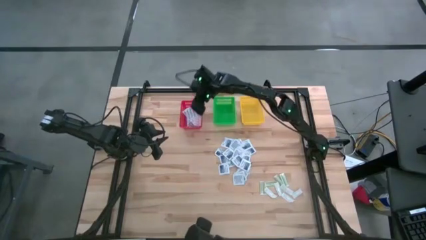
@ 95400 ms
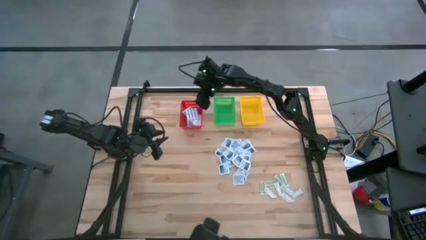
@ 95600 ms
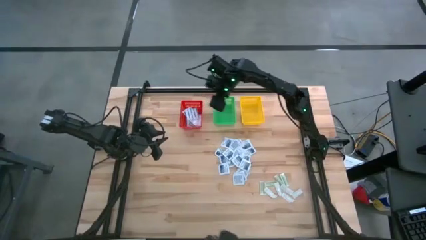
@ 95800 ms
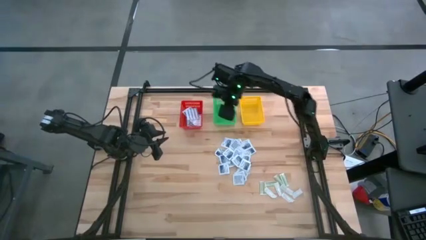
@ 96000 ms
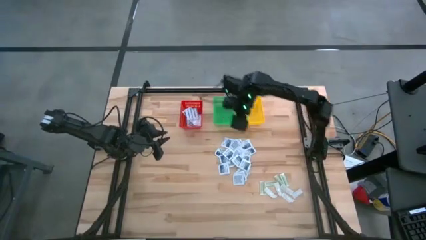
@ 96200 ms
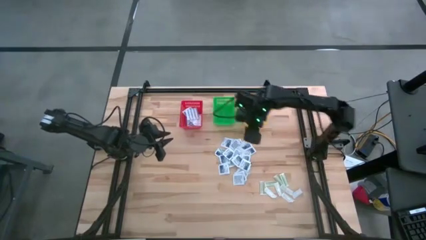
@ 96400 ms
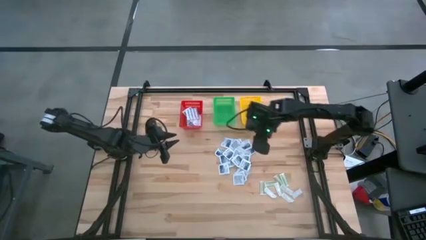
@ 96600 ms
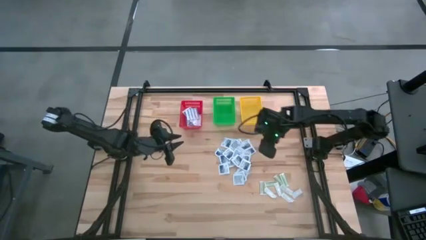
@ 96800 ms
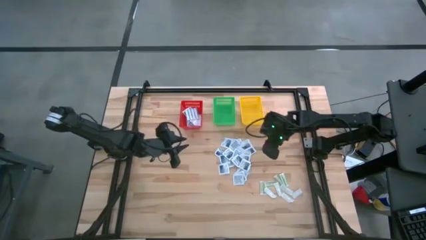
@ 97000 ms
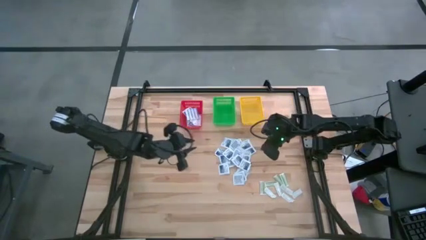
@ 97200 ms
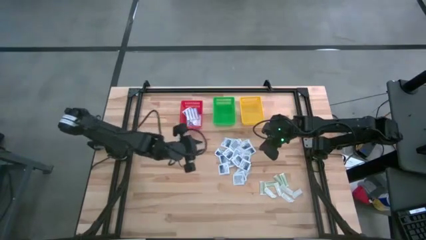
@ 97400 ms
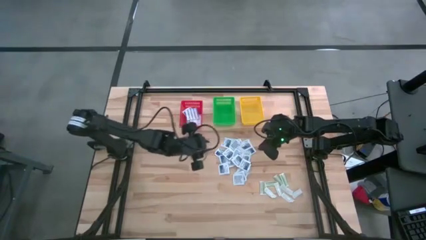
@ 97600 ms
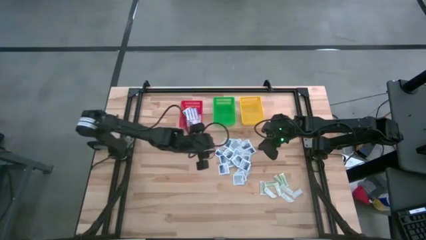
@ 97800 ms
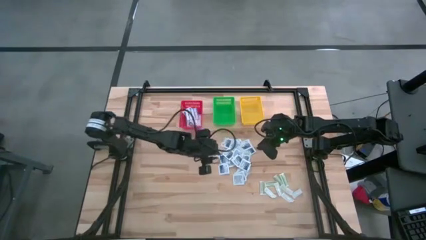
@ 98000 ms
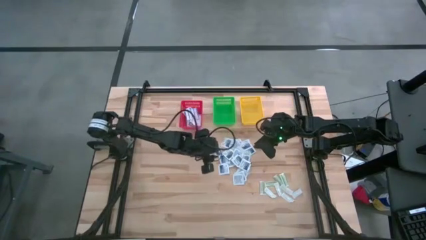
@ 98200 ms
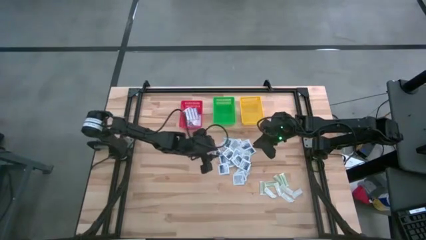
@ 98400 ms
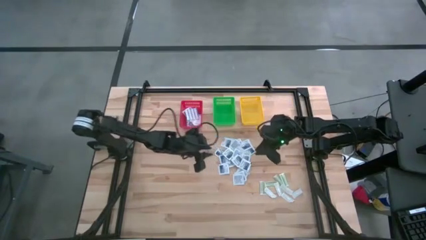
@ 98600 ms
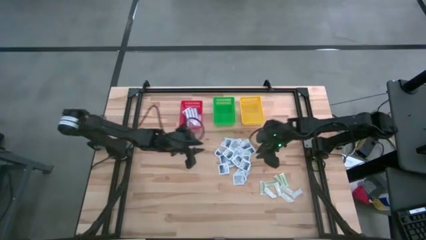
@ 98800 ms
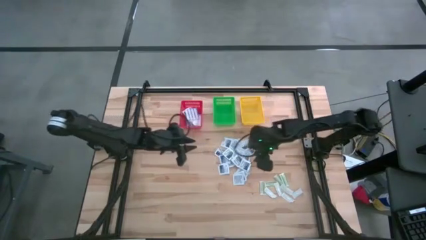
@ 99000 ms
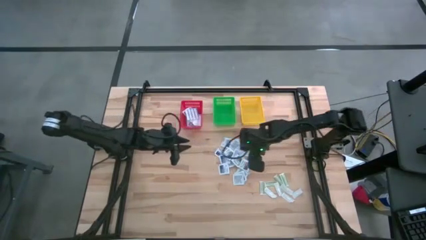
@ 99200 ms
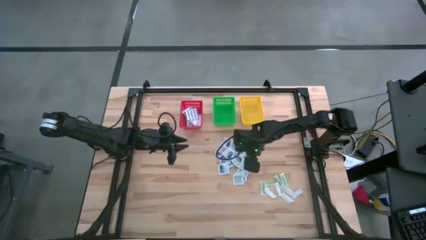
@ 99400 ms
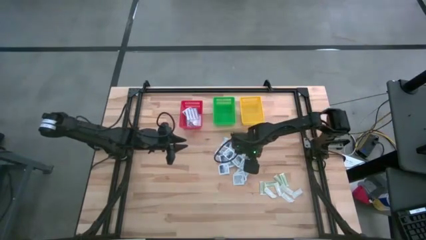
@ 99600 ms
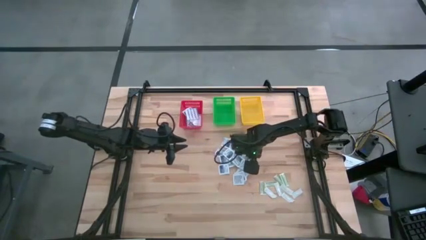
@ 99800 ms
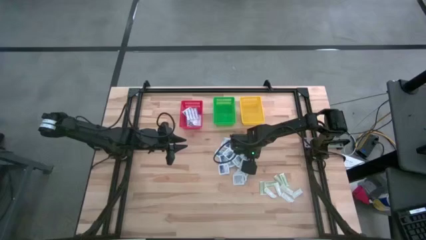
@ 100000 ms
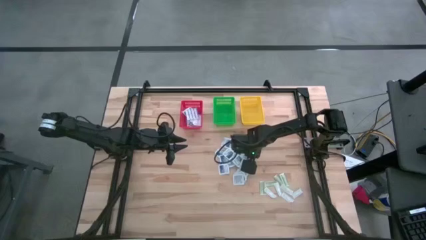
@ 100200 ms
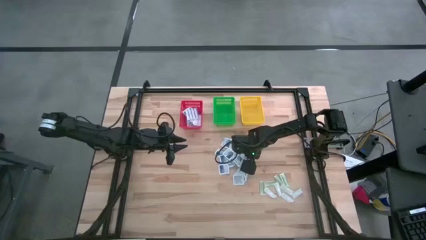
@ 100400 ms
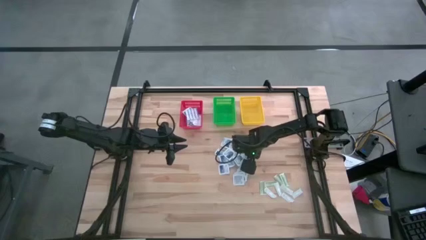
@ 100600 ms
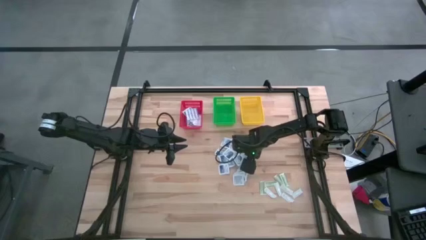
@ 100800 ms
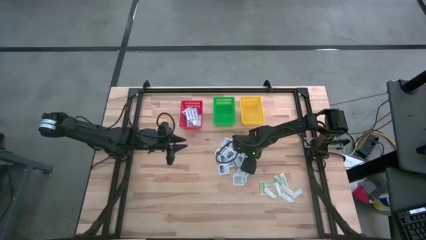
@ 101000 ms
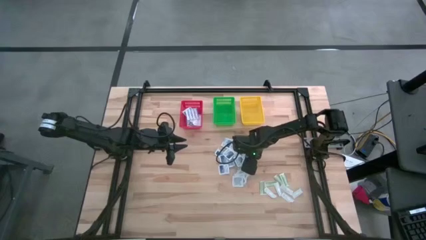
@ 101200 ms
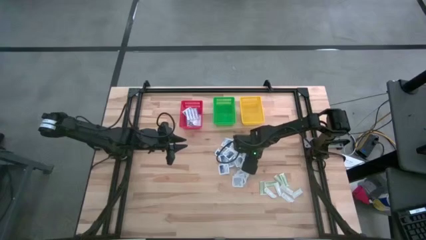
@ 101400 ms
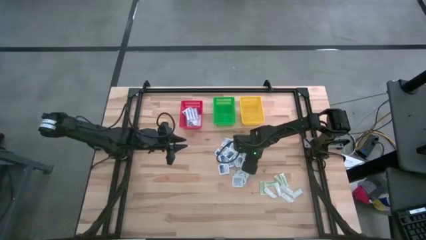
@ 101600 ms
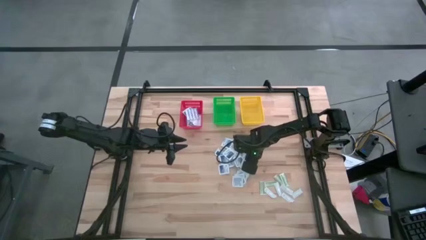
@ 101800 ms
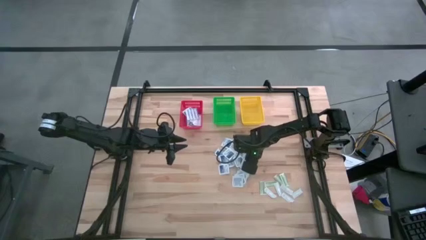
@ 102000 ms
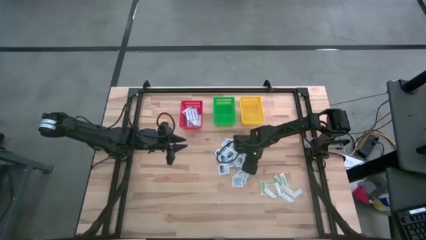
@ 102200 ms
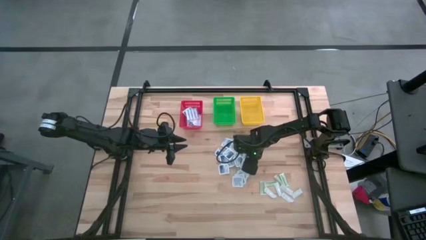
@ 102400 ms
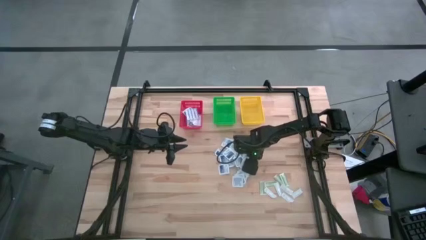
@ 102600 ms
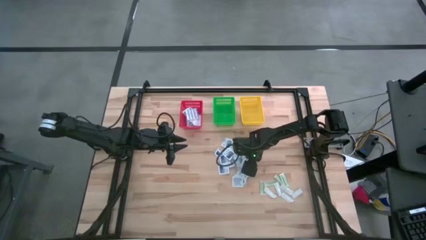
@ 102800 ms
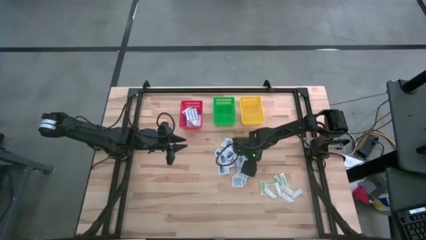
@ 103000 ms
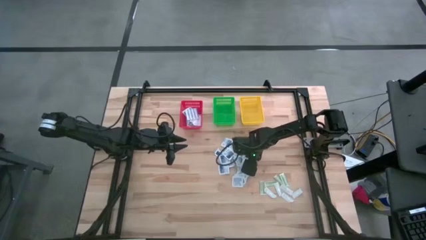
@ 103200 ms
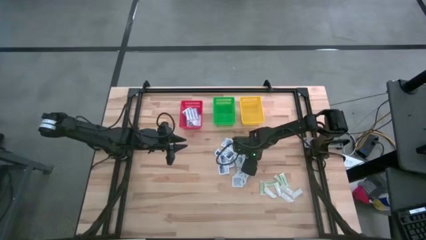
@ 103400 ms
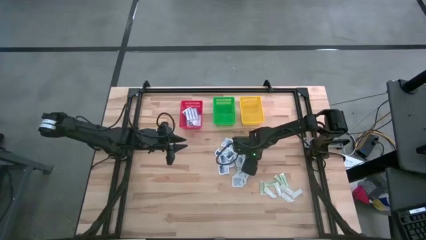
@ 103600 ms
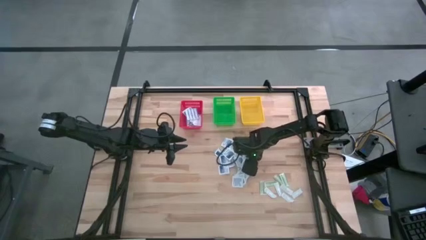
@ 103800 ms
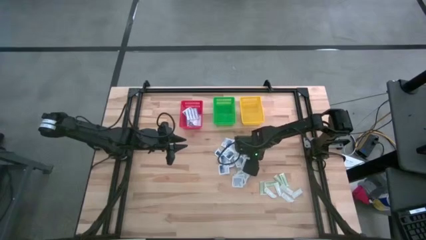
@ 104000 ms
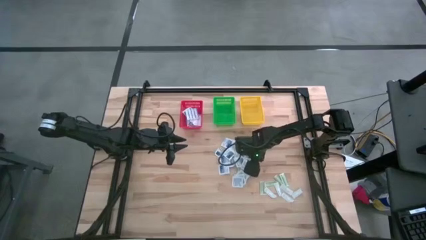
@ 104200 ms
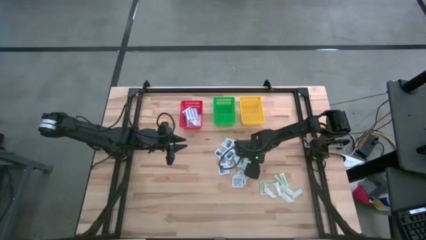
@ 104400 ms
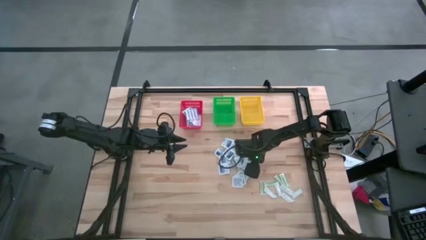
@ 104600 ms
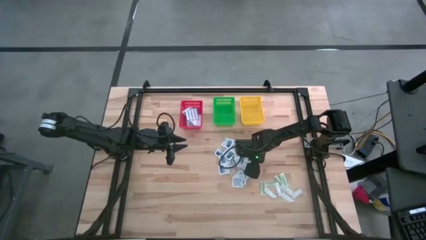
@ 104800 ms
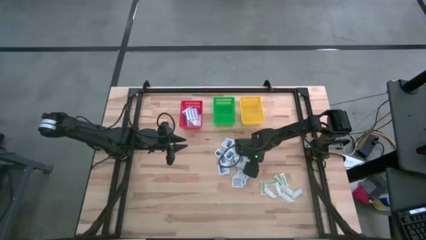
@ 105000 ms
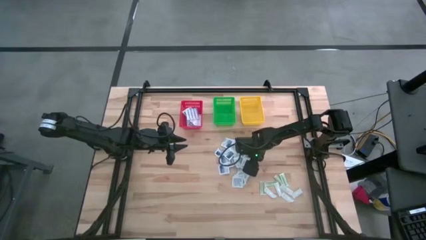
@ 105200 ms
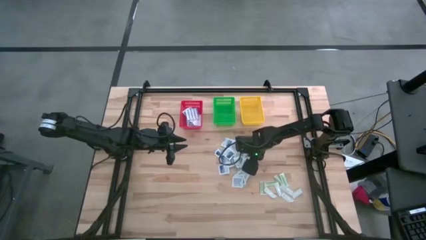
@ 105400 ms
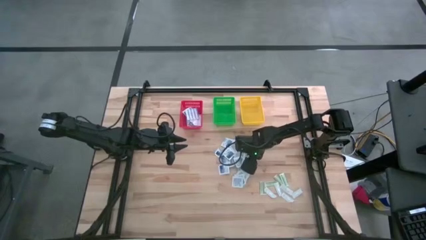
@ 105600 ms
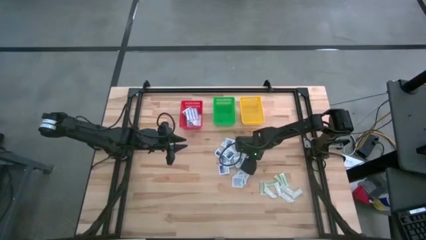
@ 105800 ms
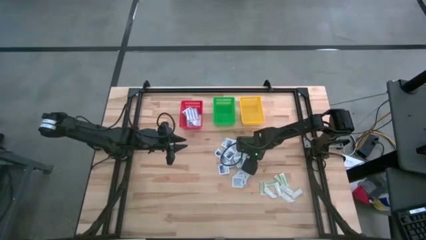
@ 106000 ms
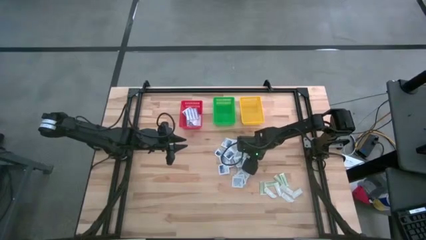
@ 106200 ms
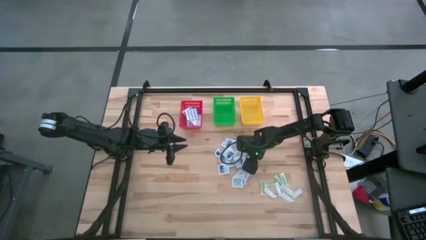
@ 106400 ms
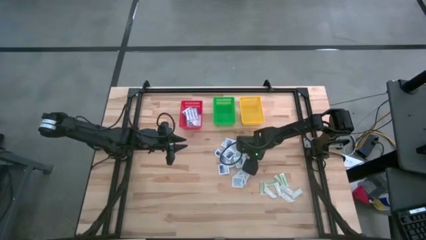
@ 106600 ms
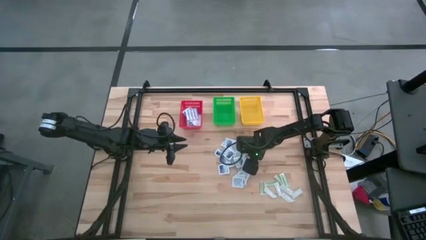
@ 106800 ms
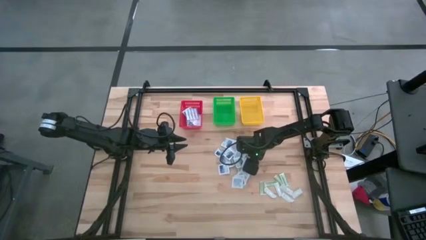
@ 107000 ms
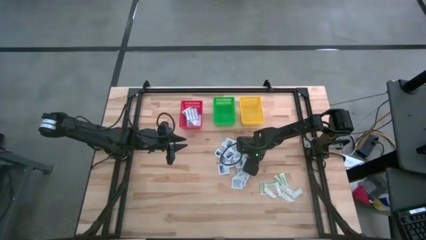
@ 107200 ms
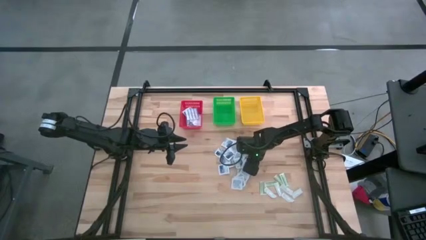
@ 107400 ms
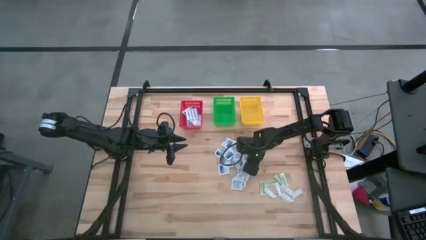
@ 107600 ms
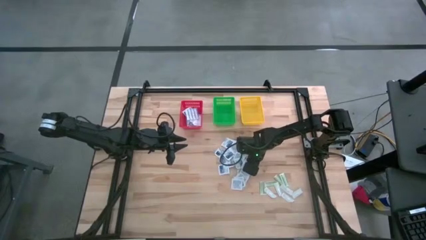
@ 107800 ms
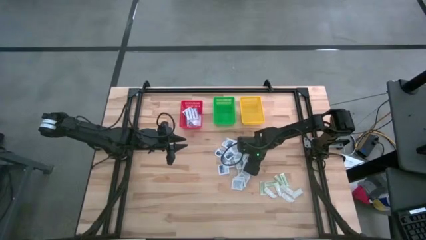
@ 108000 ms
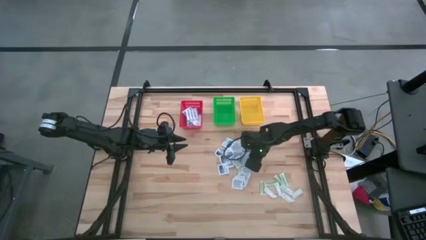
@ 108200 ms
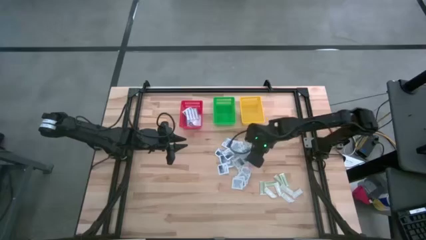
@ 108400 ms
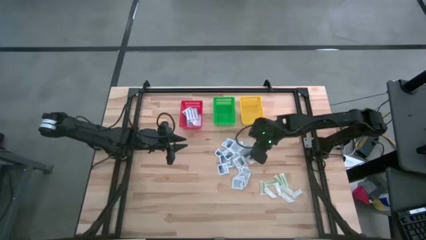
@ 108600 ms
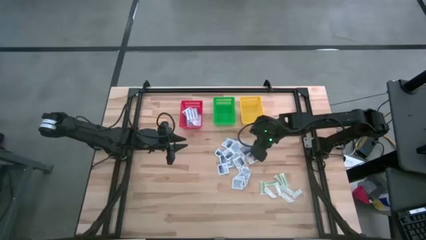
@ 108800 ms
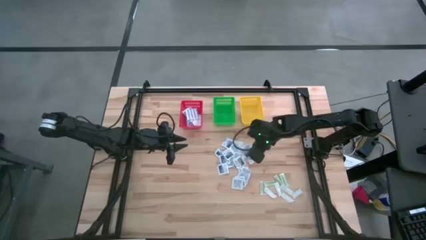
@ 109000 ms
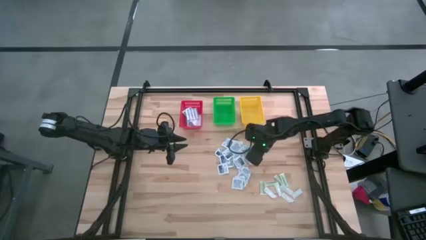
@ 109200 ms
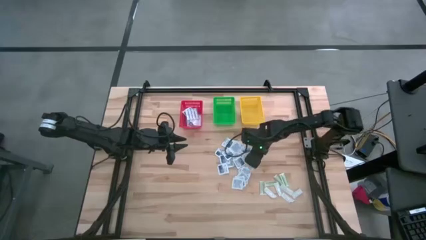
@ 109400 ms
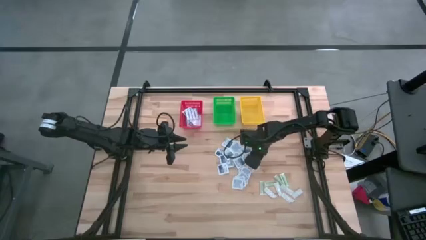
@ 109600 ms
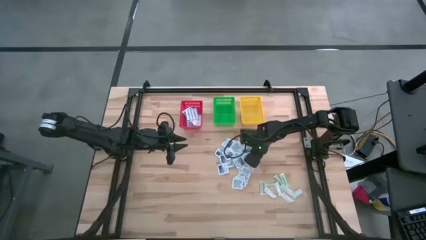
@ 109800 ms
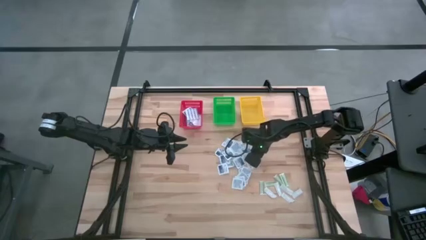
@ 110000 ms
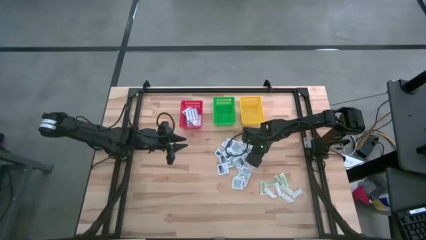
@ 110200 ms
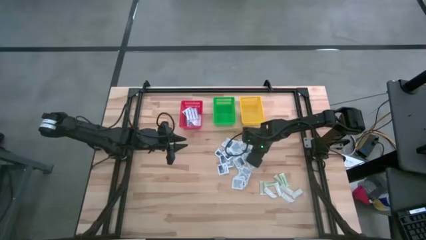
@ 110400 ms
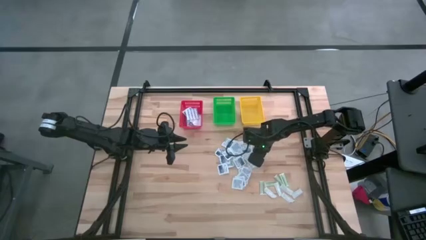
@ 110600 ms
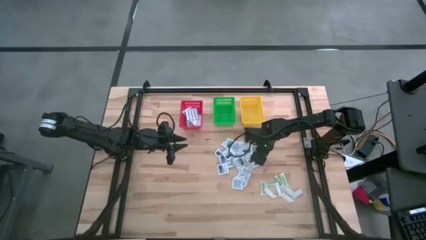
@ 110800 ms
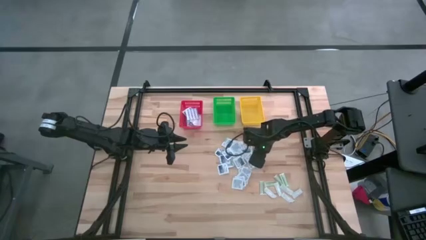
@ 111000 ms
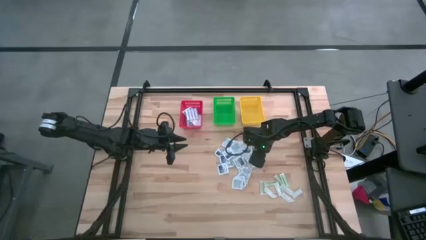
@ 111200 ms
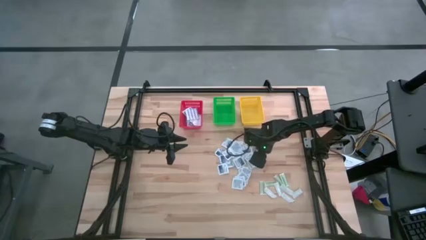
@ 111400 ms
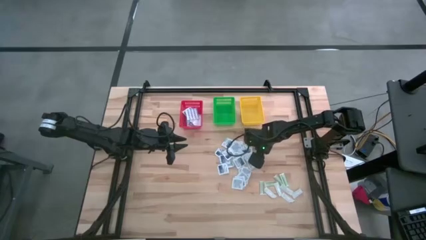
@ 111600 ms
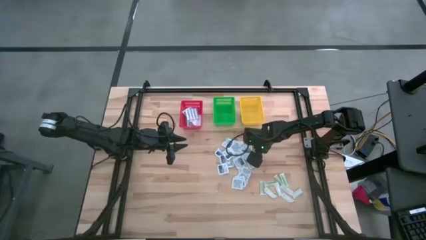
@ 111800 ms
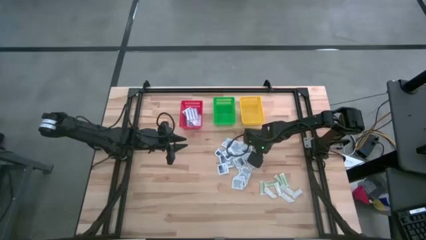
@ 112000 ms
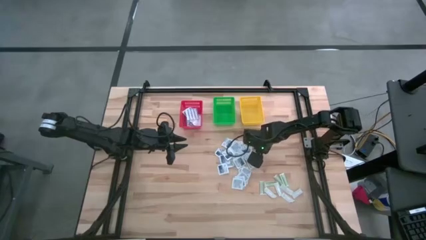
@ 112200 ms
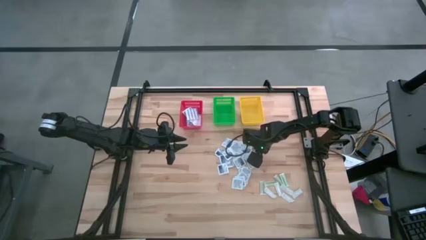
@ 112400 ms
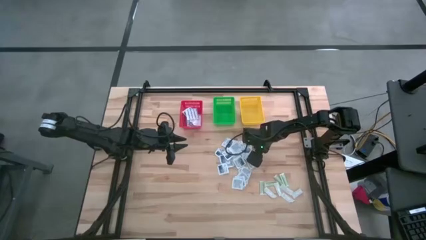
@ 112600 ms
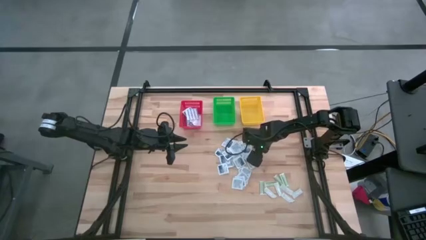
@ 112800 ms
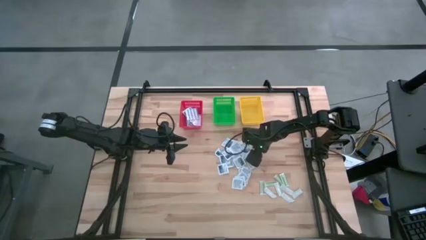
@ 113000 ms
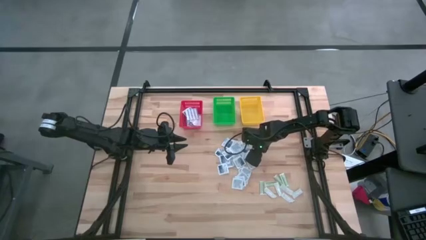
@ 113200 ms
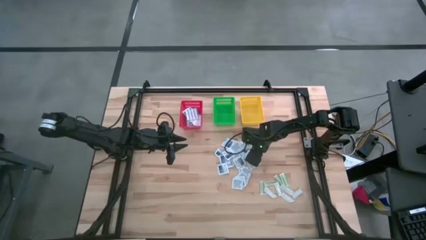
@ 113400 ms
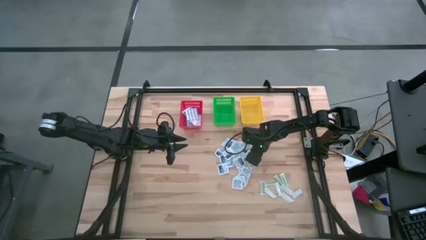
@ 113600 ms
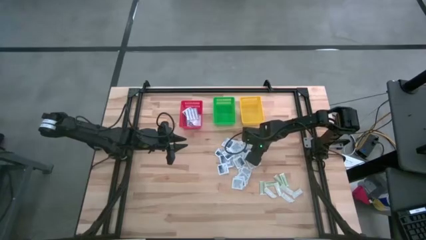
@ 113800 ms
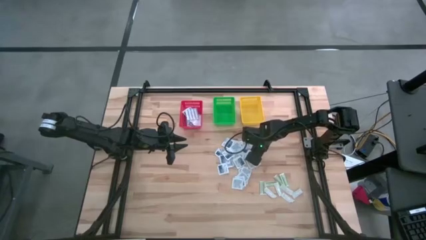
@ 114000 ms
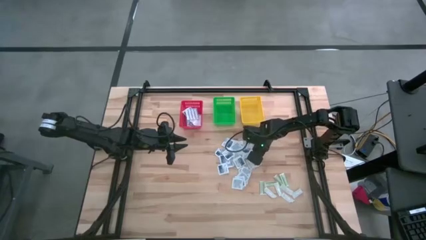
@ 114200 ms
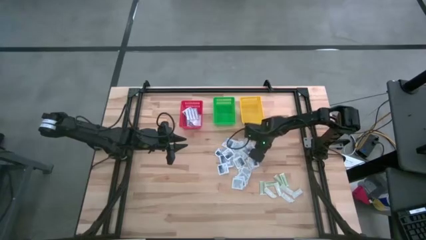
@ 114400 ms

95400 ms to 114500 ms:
Task: Pick & Place First Aid Supplies
Put the alcohol pad into the green basket
